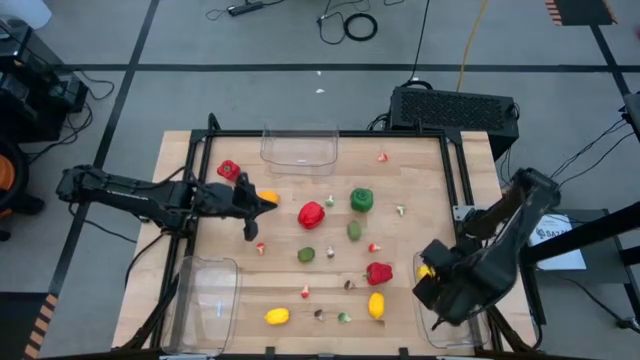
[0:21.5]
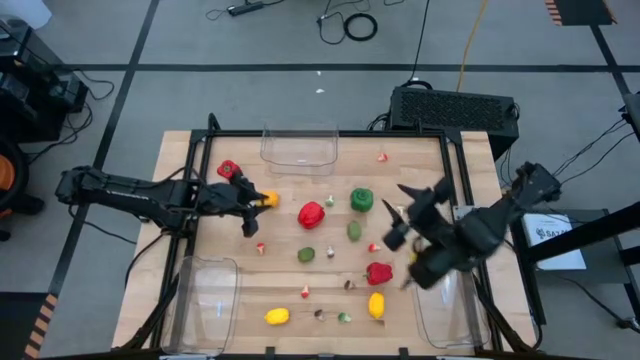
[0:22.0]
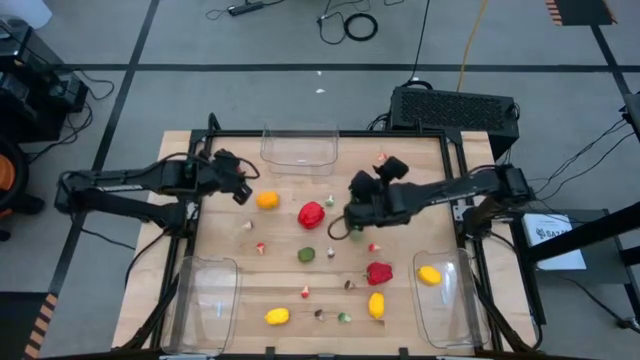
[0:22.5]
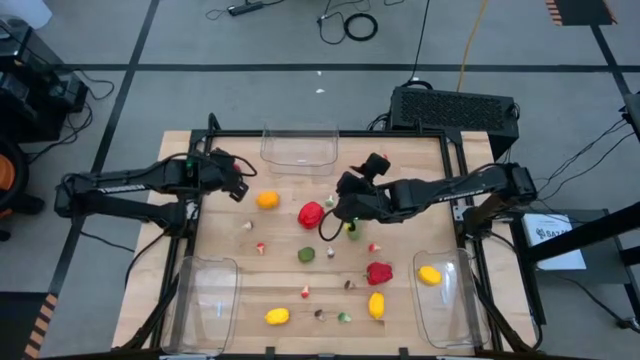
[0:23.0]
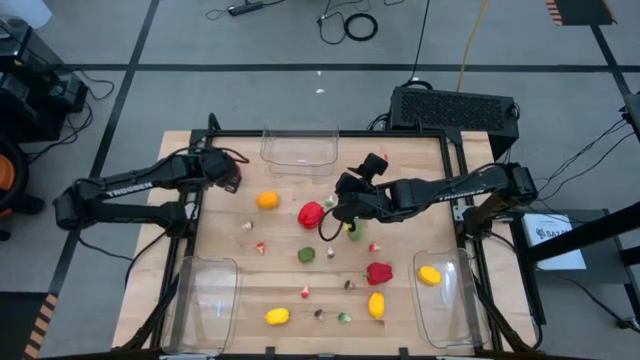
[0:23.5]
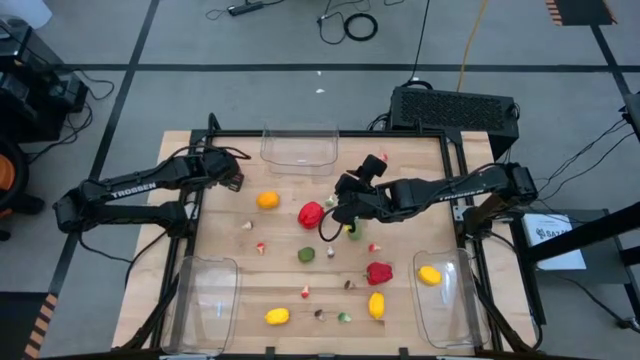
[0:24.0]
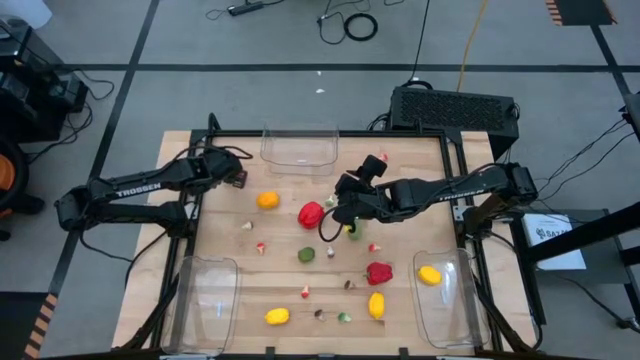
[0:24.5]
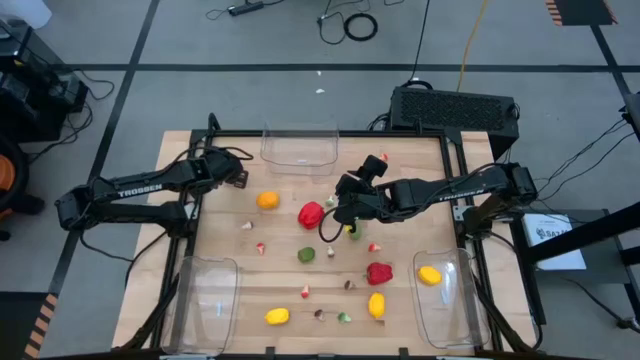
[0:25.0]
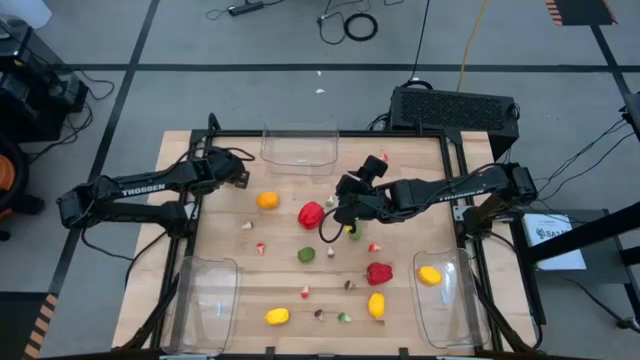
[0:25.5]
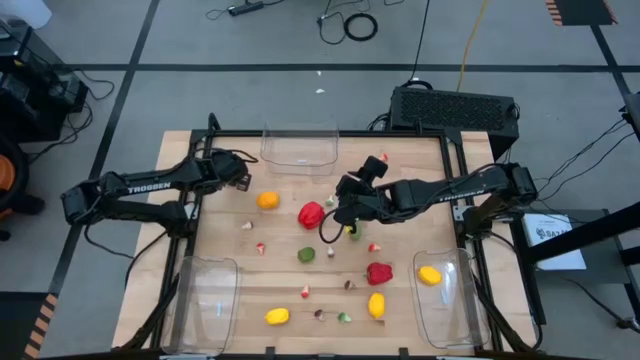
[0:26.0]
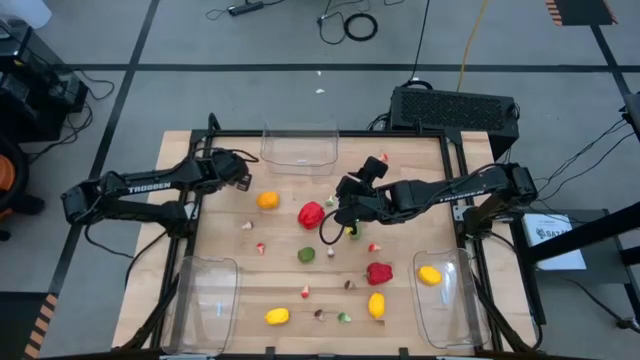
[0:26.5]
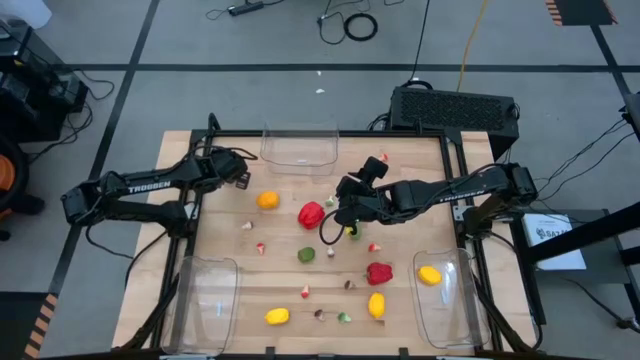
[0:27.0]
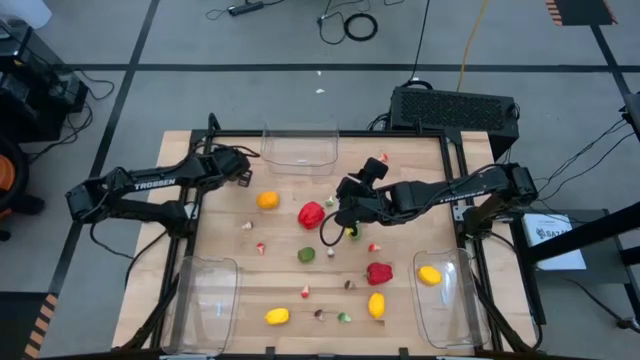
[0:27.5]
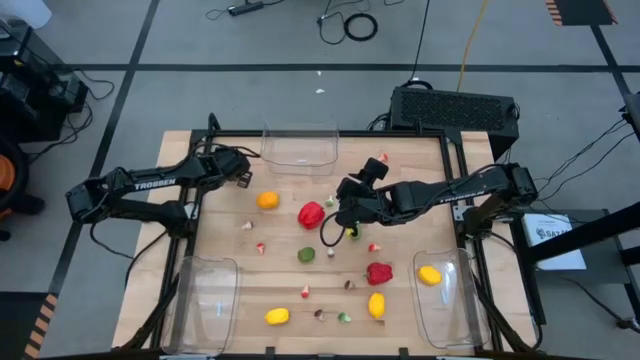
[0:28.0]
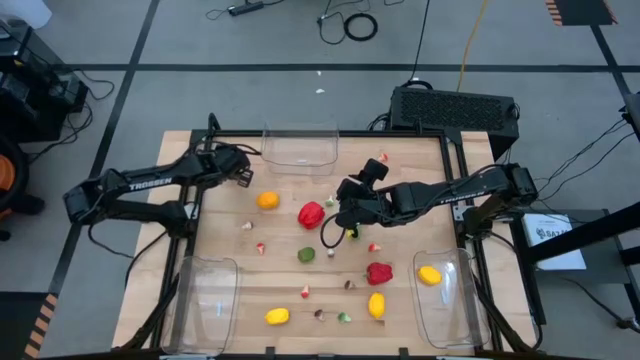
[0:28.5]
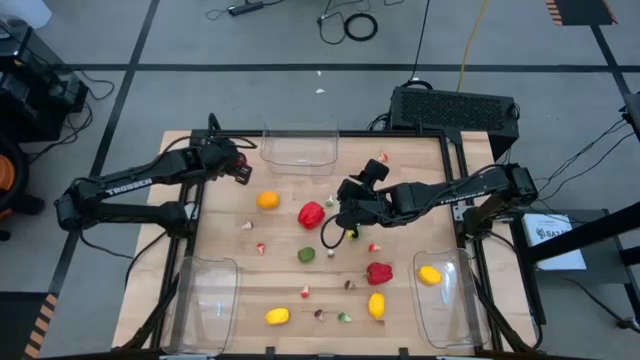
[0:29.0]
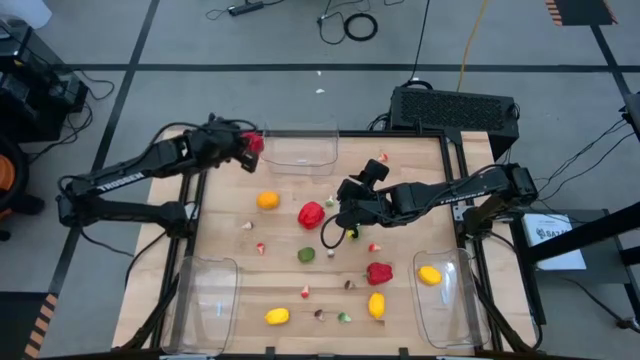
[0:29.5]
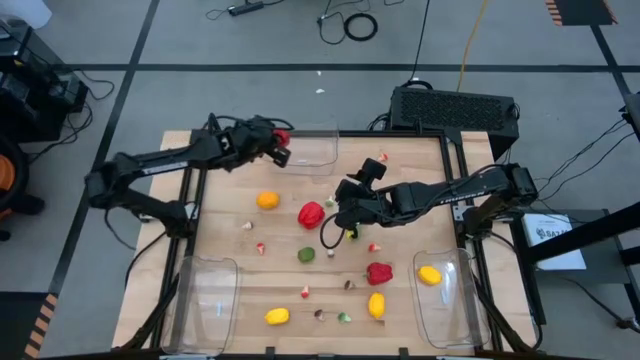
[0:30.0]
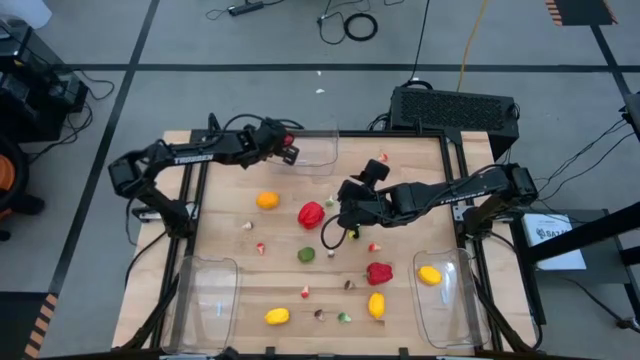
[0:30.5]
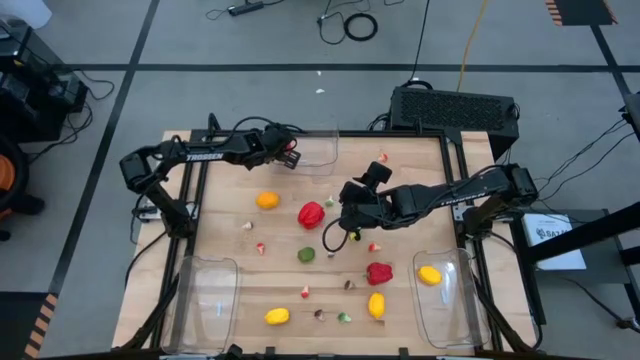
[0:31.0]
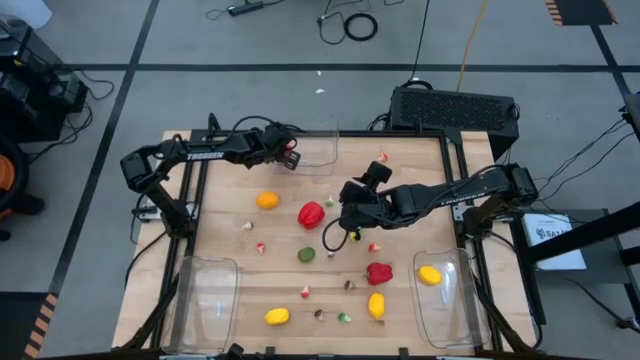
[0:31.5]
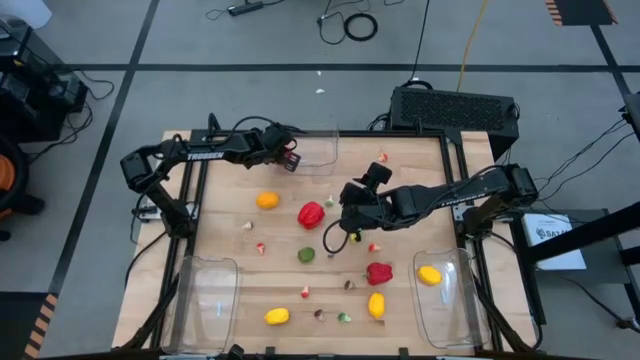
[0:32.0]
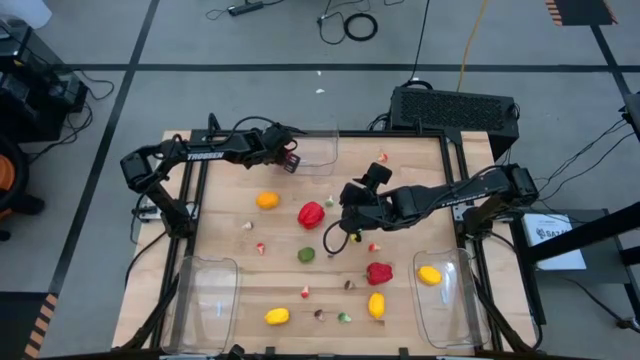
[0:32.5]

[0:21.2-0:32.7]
Task: Sort produce into baskets
Put the red bell pepper into the top transparent bin

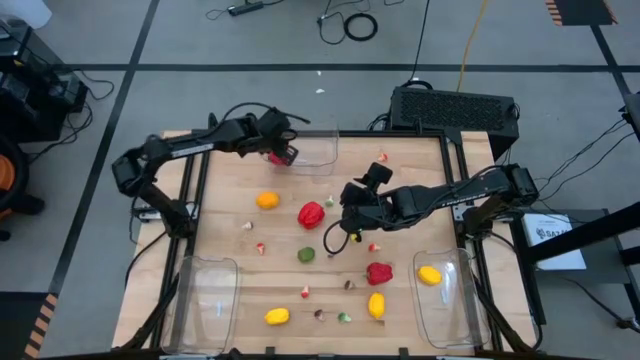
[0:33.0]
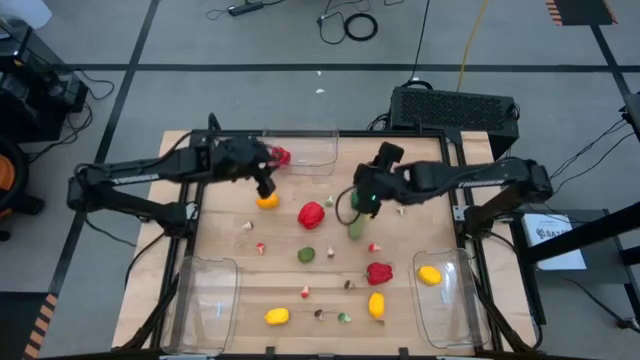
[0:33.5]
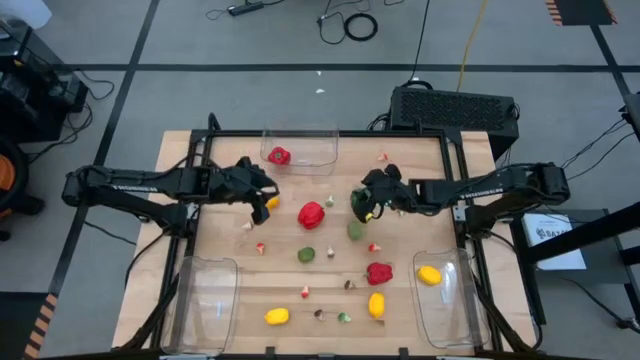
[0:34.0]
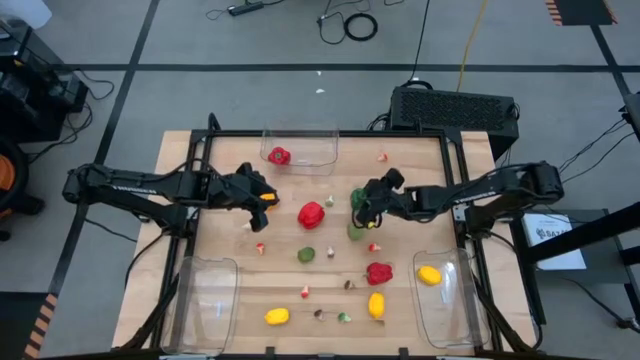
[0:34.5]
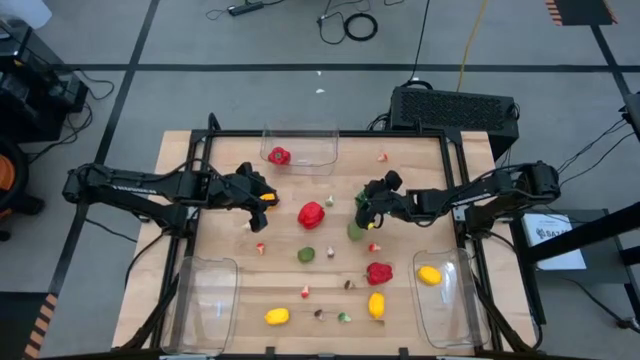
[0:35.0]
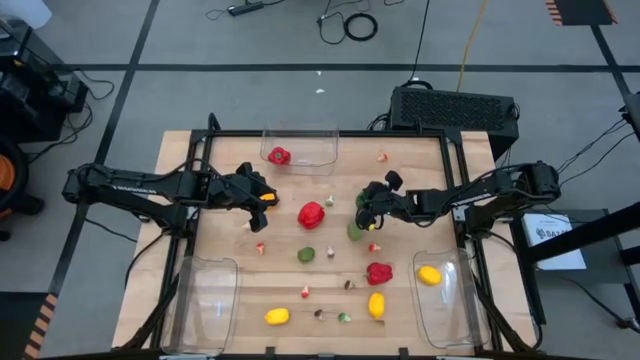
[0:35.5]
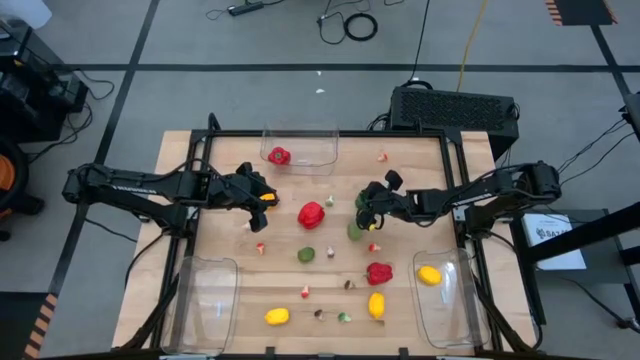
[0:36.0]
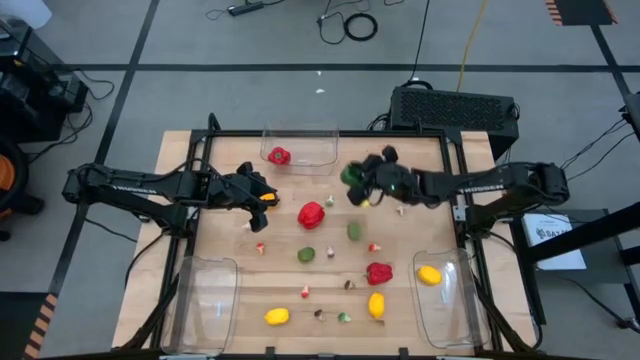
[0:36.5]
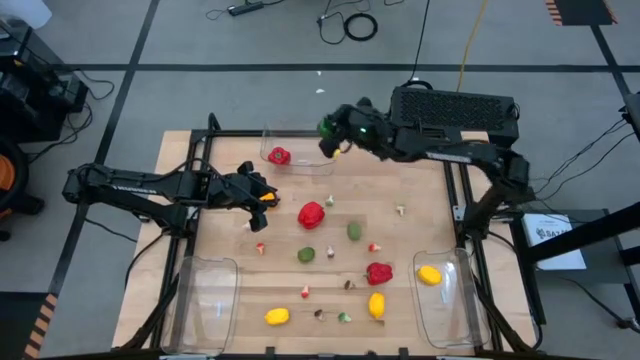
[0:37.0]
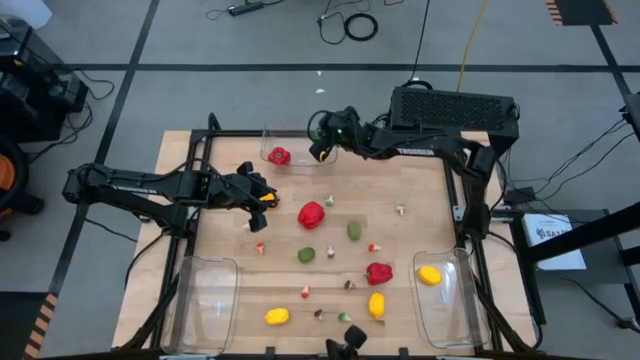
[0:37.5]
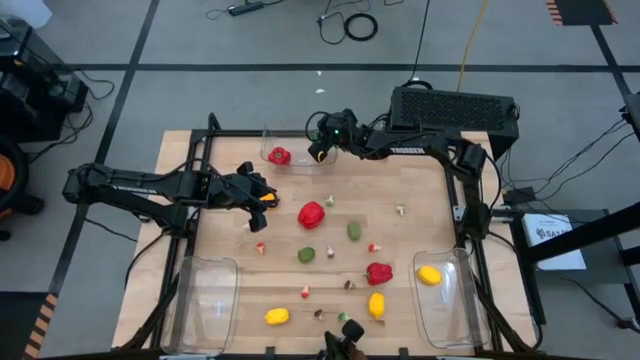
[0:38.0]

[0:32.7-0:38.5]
Put the green bell pepper into the top transparent bin

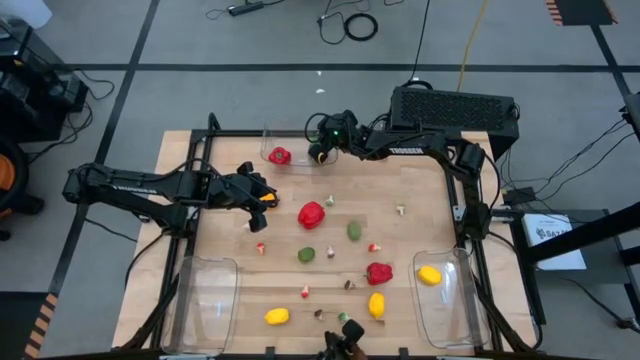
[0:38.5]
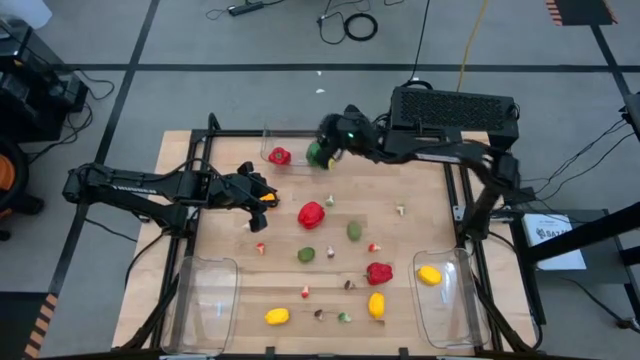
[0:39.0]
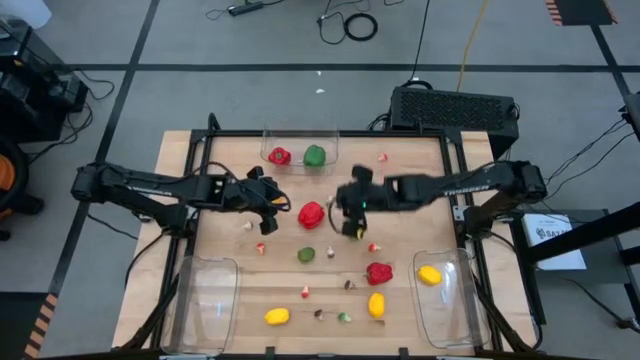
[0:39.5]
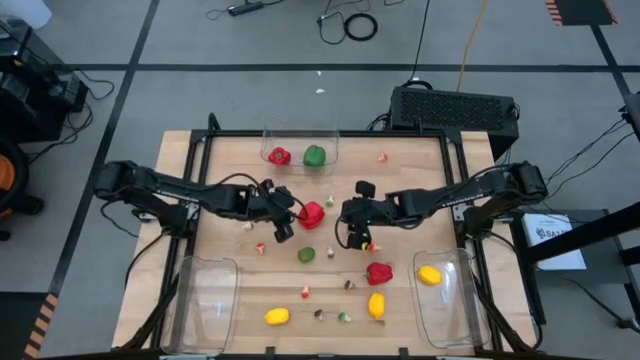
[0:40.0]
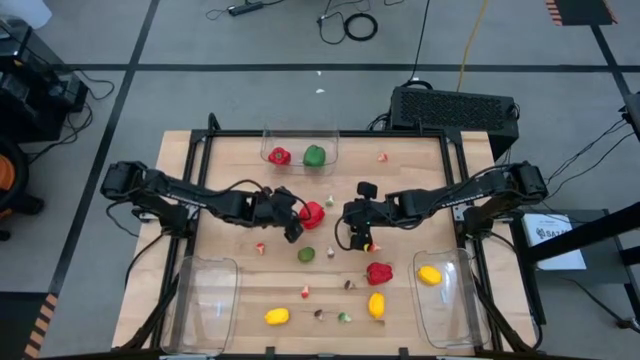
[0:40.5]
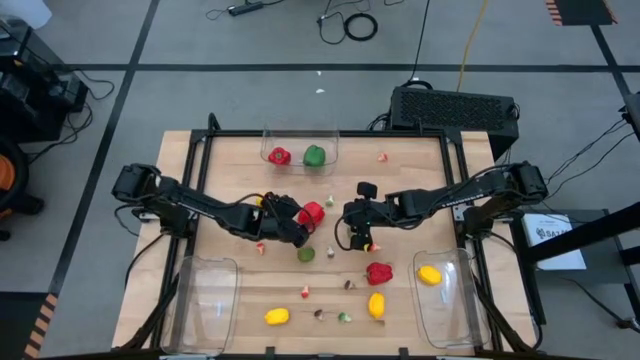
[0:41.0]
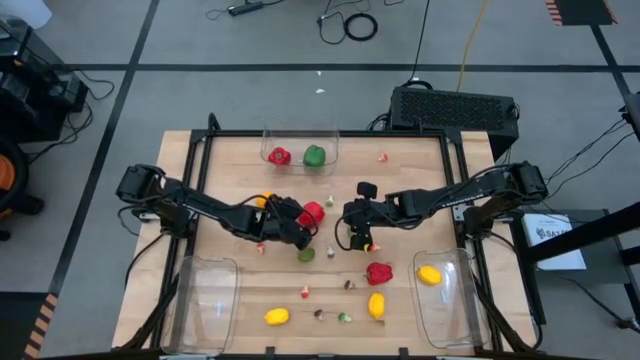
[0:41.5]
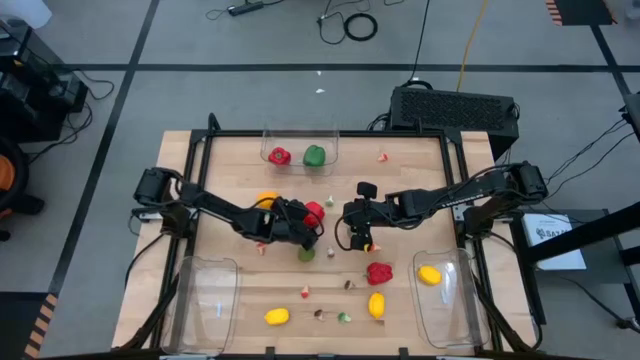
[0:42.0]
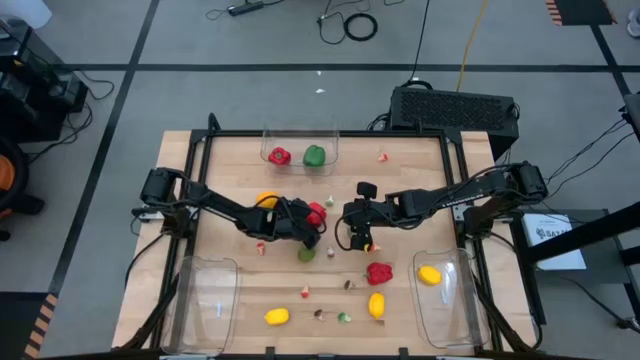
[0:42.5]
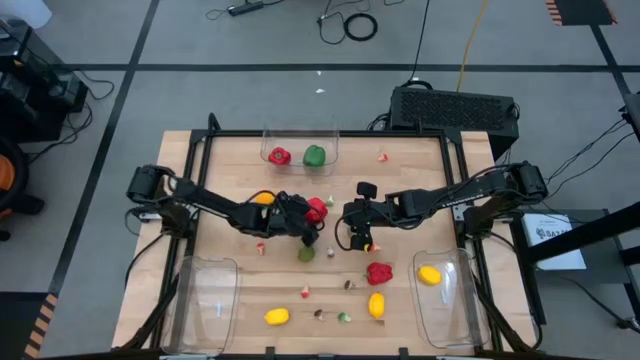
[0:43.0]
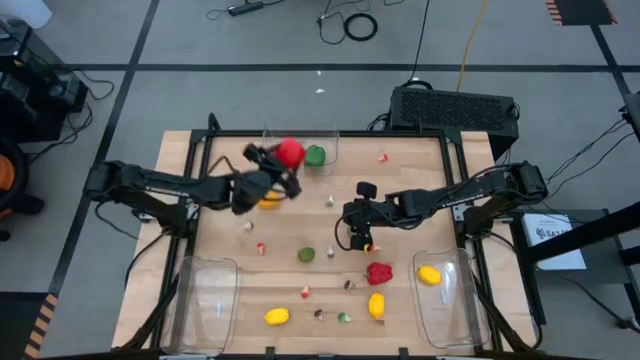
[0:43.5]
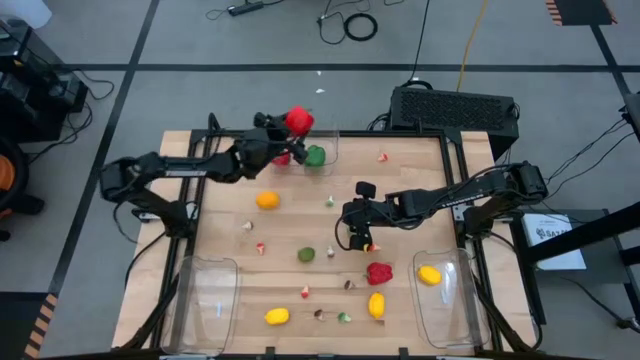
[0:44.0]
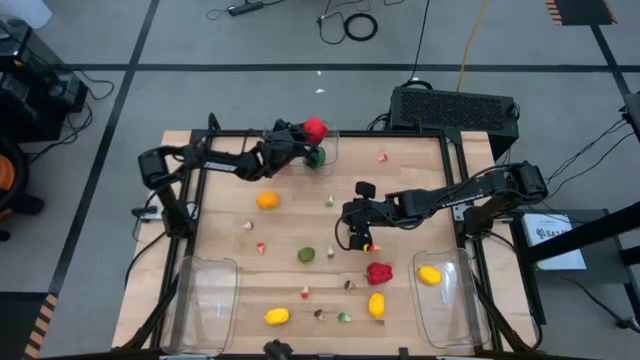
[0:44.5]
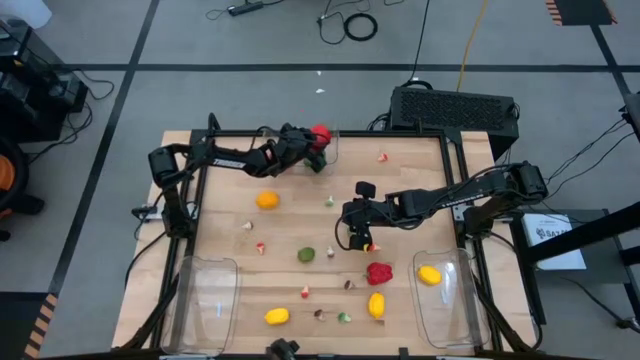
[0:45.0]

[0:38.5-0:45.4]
Put the red bell pepper into the top transparent bin
